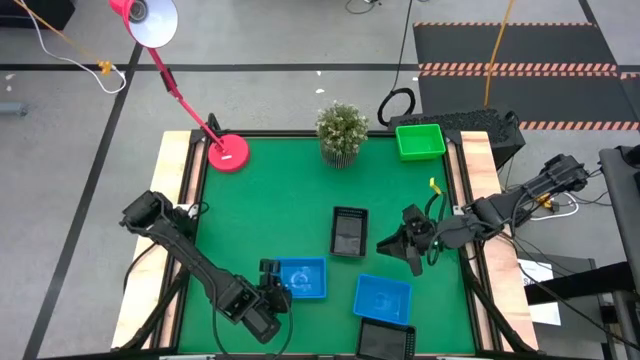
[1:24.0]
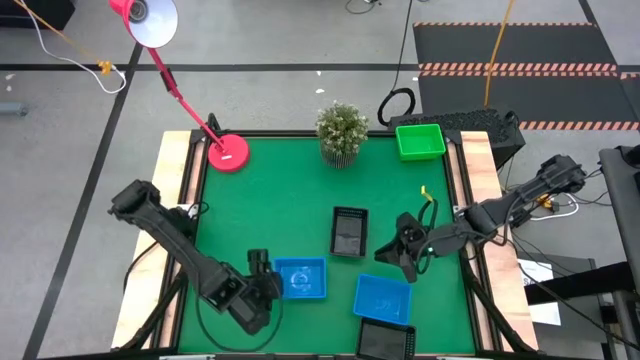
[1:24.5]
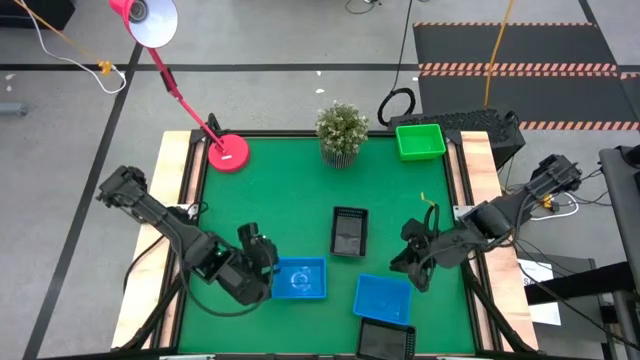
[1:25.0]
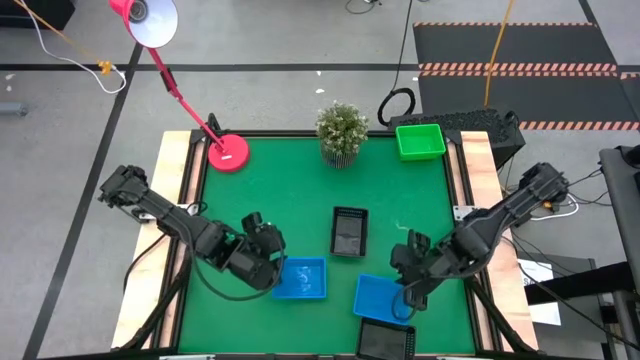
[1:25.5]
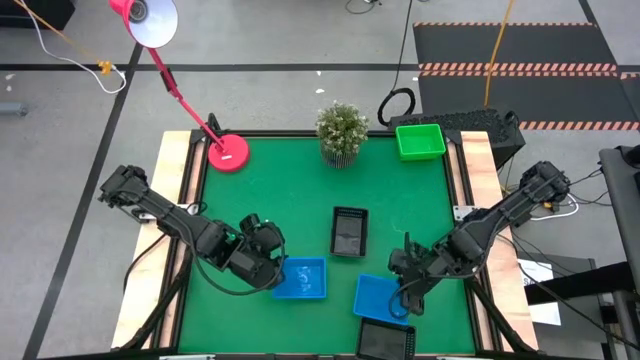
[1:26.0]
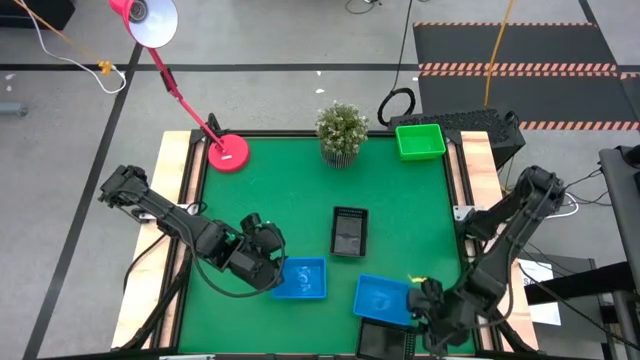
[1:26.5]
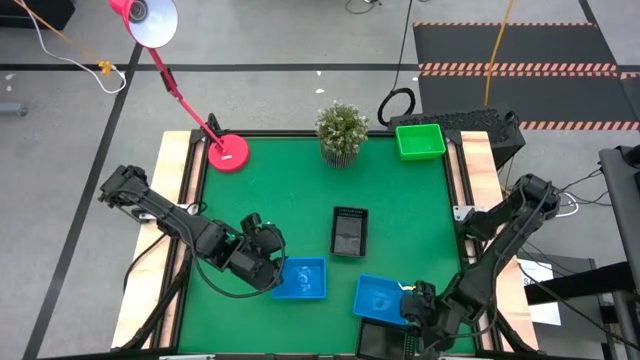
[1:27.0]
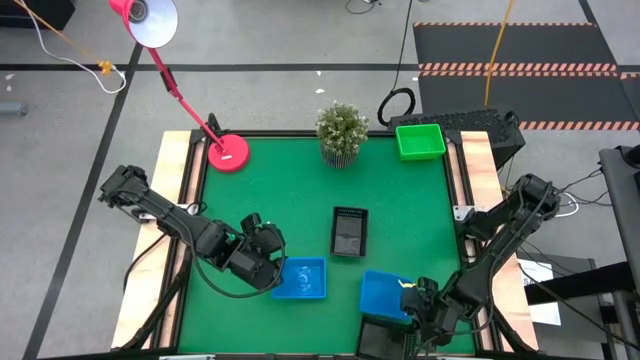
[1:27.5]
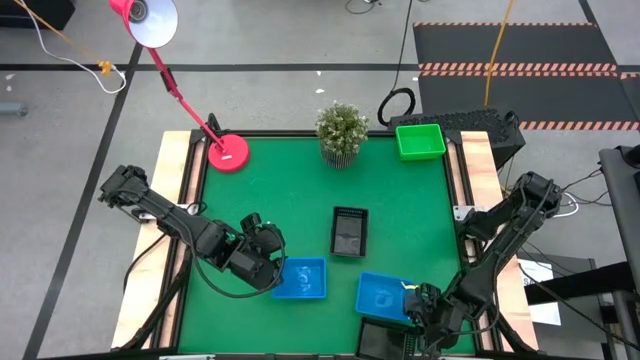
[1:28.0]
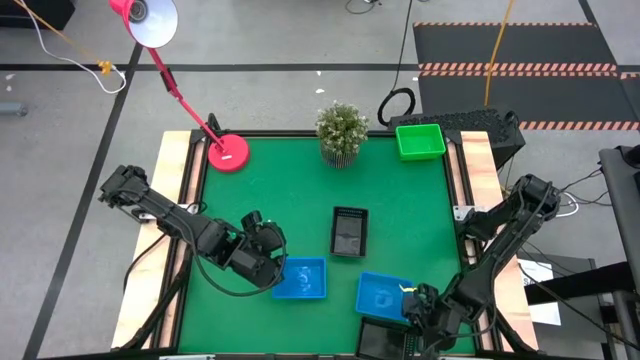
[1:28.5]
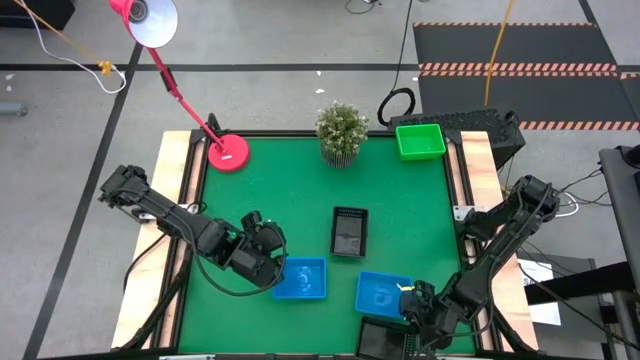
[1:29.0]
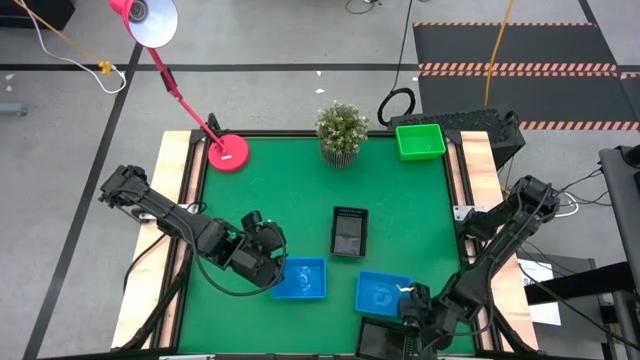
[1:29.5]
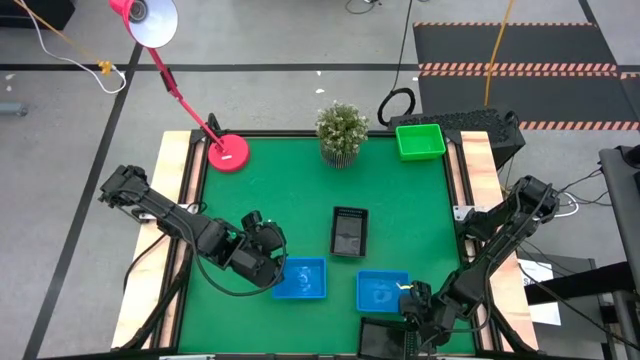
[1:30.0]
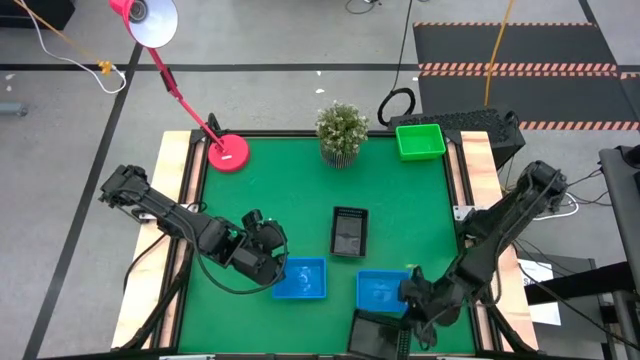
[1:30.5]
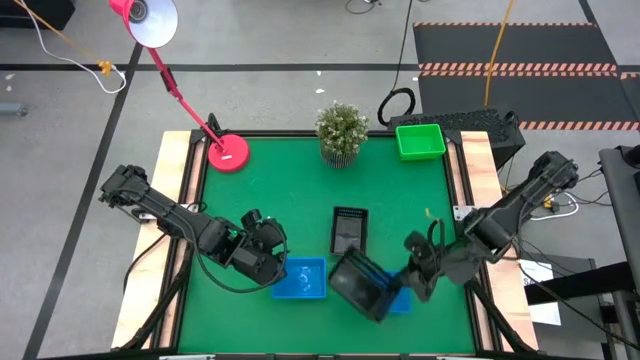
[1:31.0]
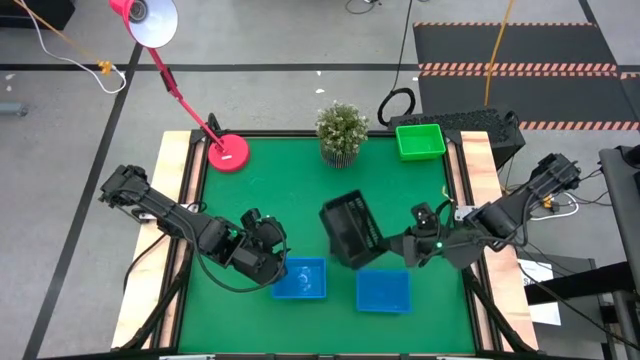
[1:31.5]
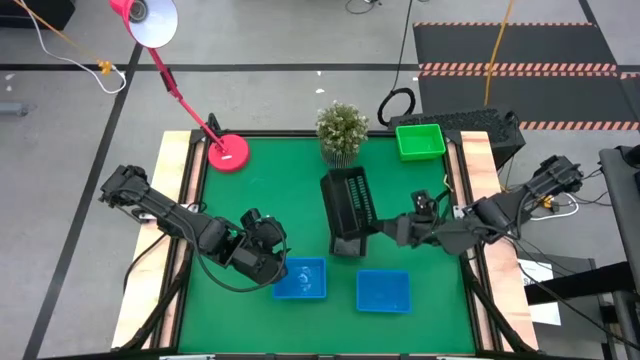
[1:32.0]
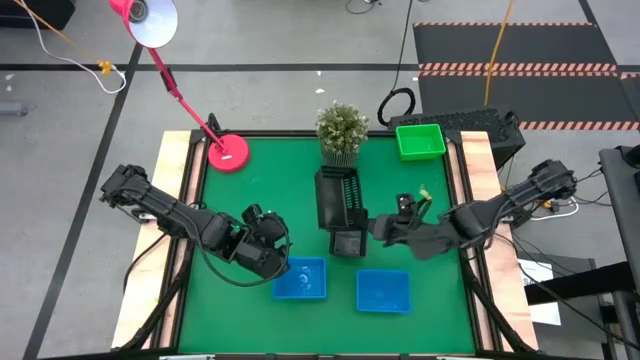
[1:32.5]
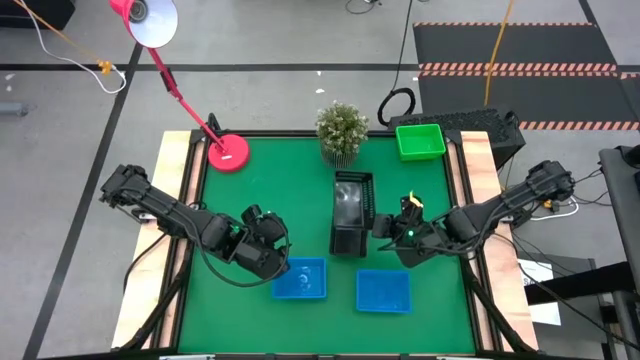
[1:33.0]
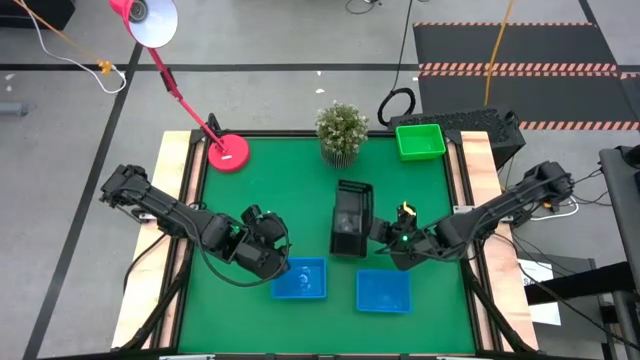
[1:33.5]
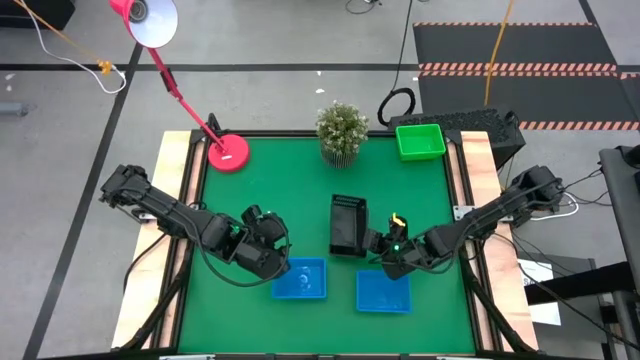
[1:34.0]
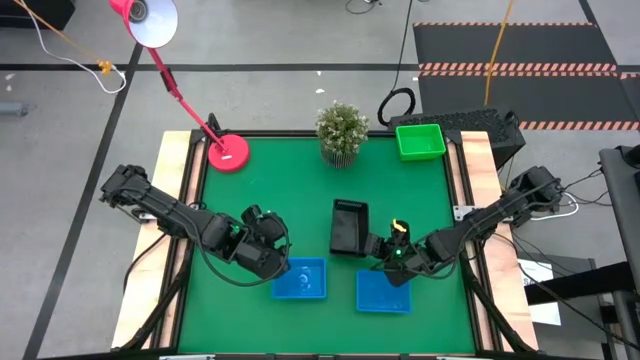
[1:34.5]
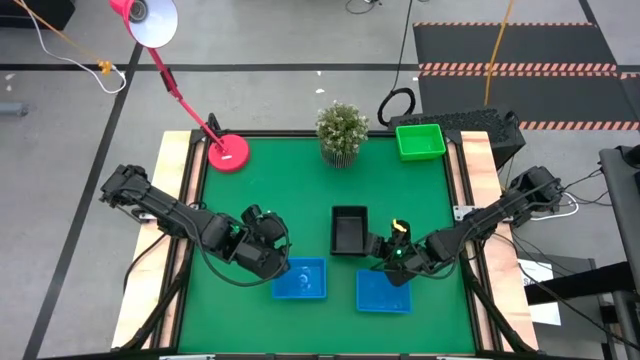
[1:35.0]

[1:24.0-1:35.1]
Stack the bottom black bin on the top stacked black bins

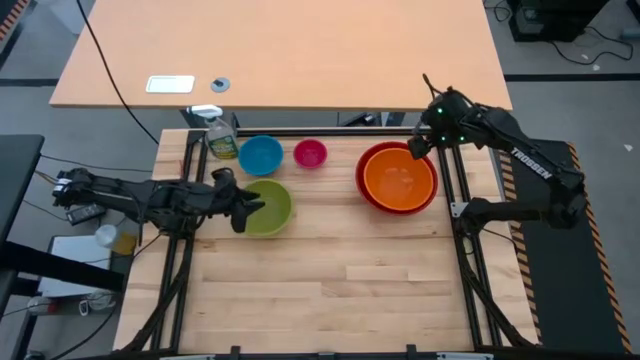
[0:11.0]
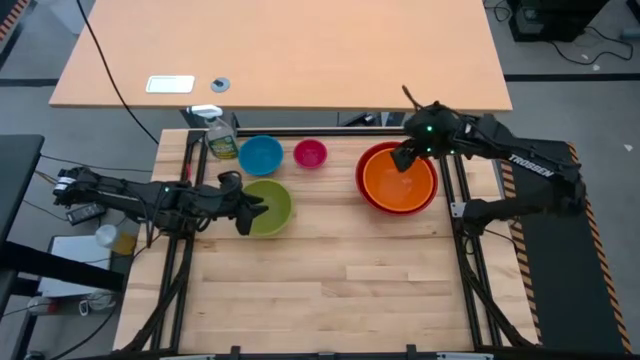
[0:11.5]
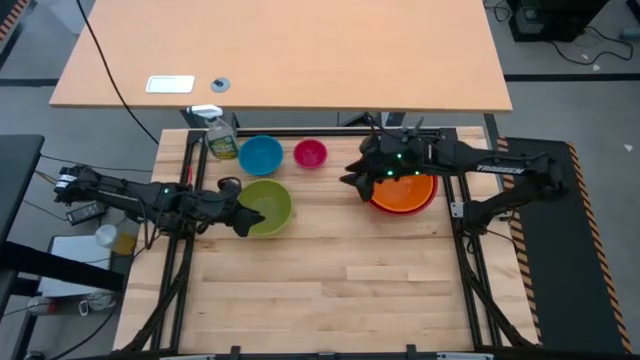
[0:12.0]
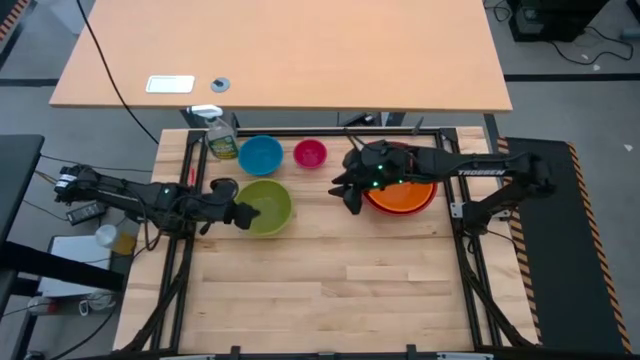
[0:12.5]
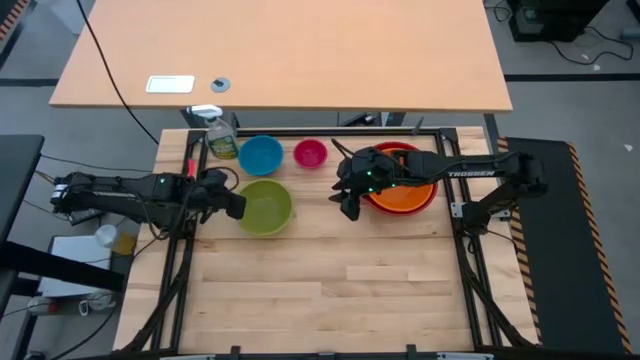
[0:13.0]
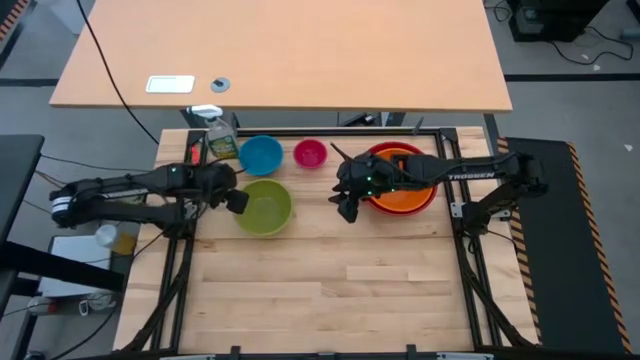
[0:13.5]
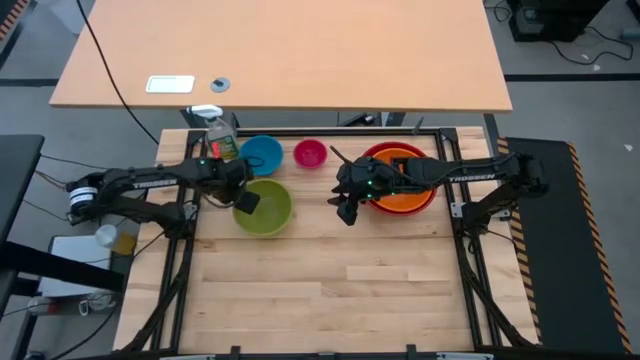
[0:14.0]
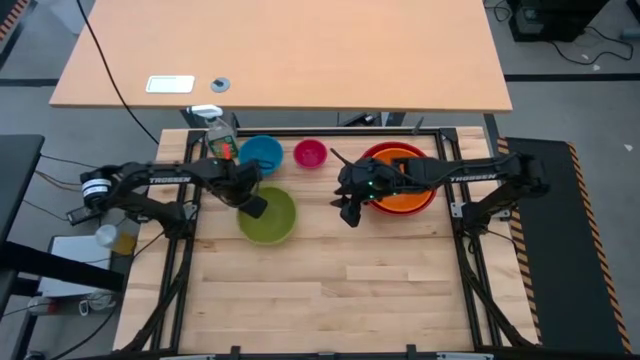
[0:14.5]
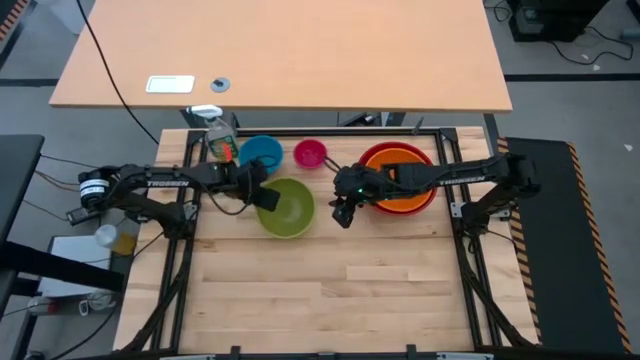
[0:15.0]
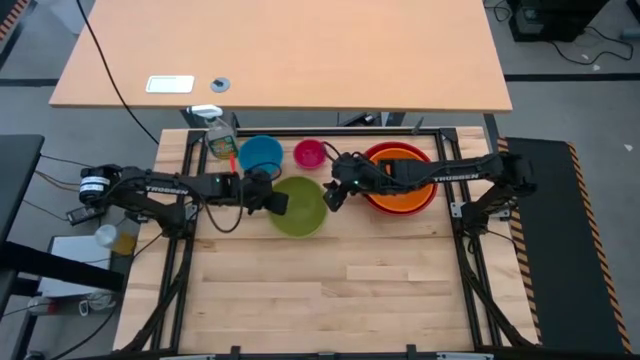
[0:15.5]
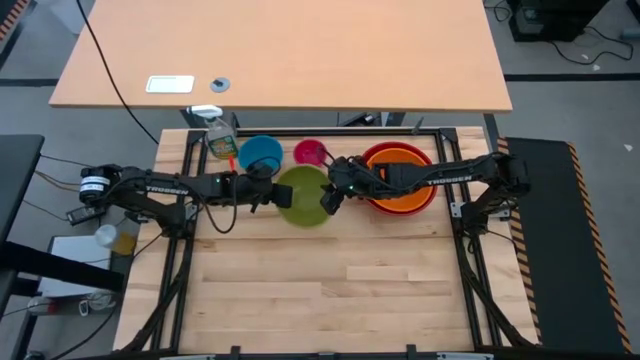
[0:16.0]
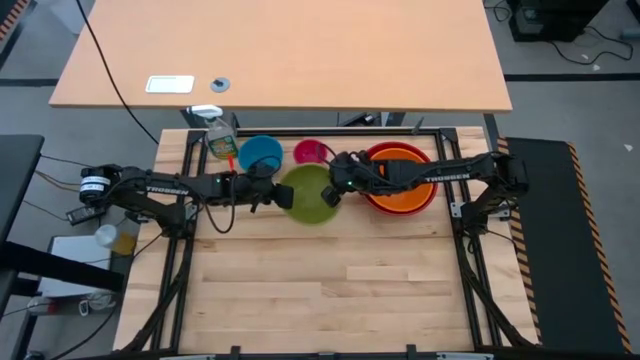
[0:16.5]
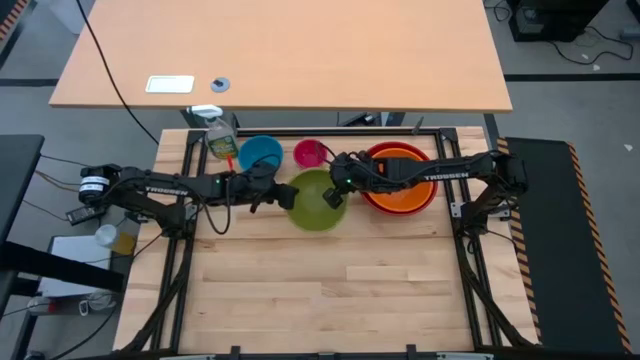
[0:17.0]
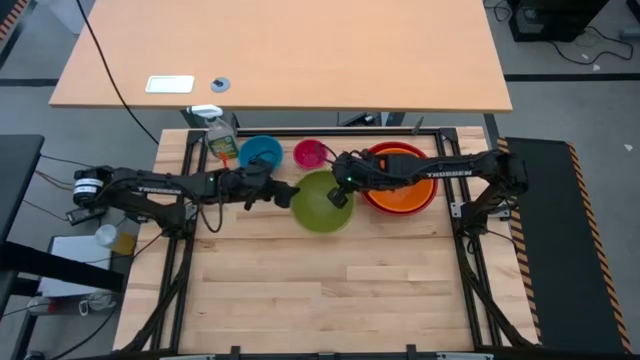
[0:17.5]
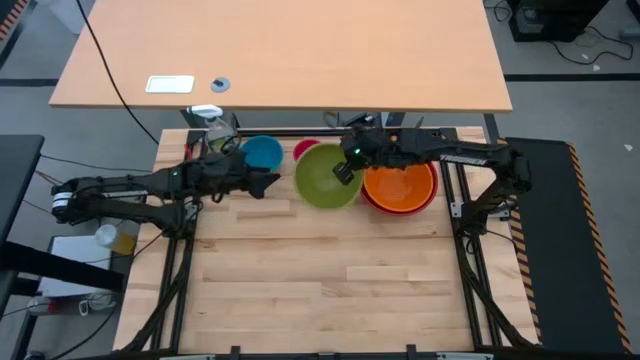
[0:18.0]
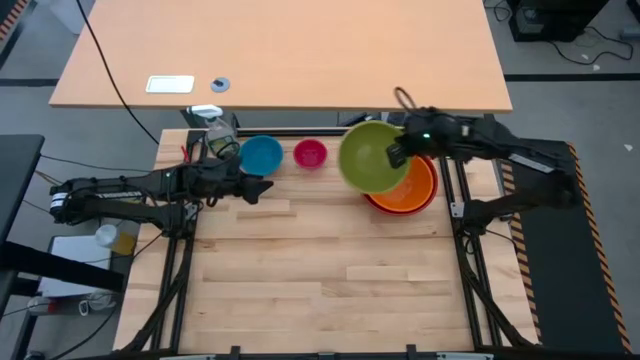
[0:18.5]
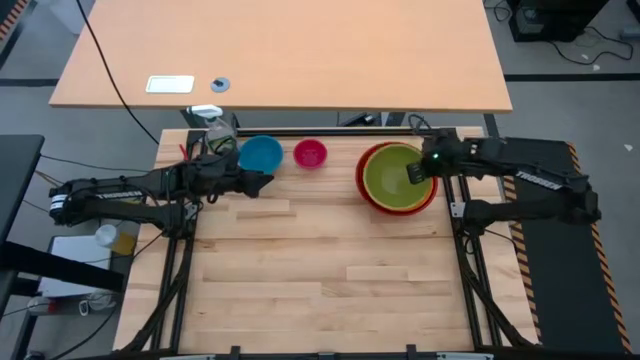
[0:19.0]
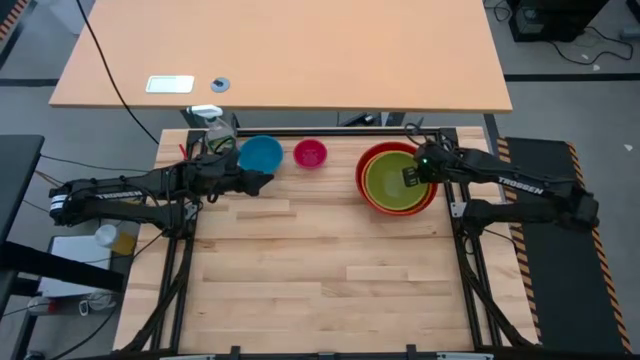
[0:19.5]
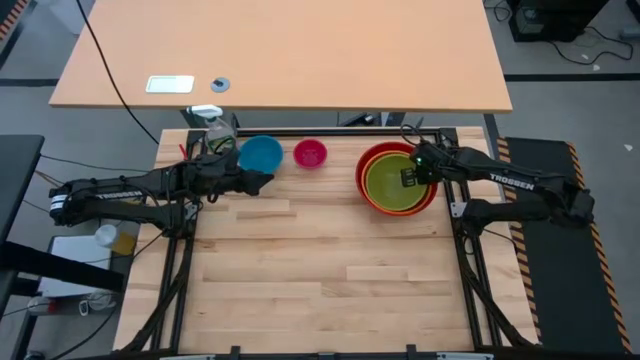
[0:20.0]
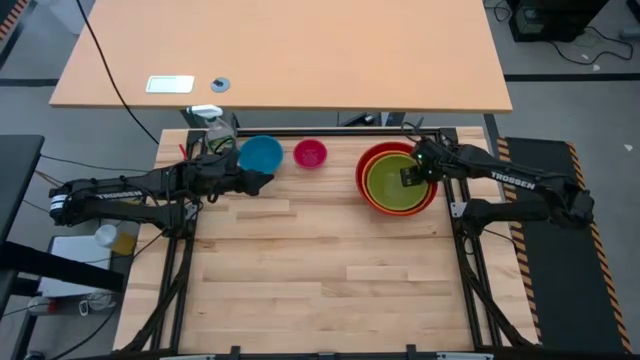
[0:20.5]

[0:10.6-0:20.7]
Stack the green bowl on top of the orange bowl
